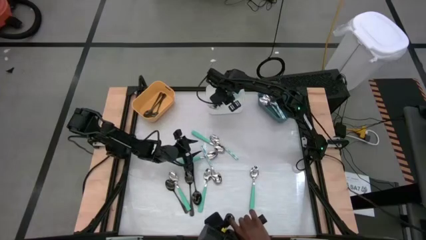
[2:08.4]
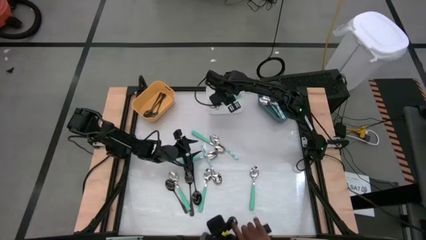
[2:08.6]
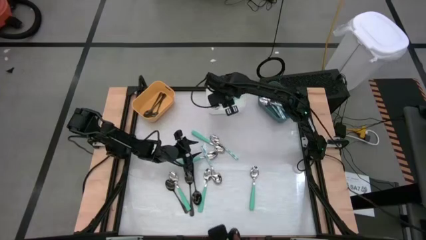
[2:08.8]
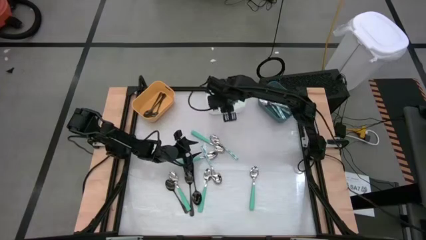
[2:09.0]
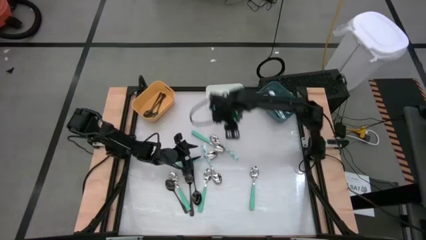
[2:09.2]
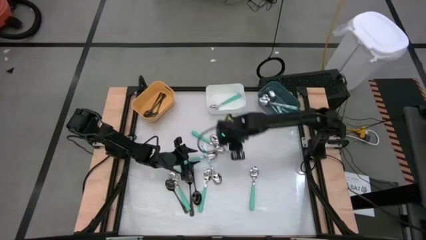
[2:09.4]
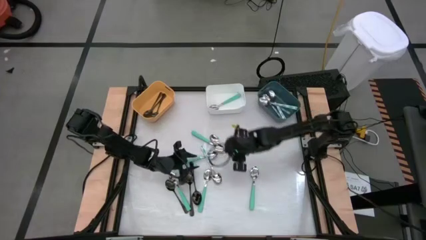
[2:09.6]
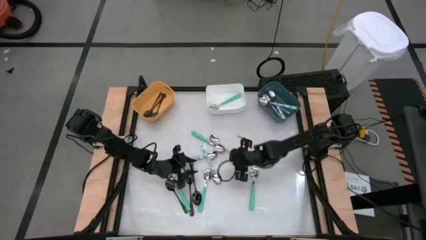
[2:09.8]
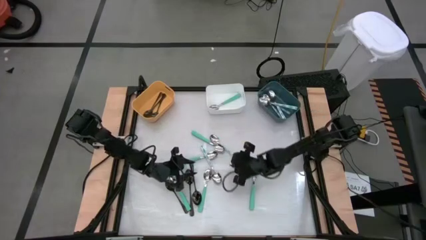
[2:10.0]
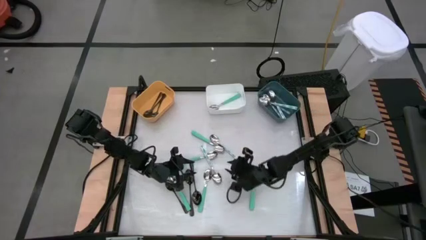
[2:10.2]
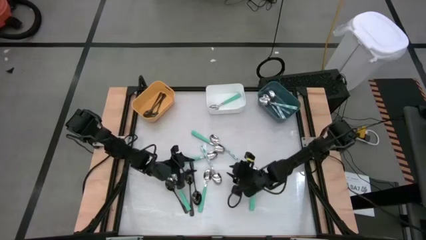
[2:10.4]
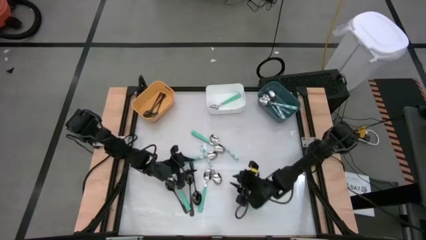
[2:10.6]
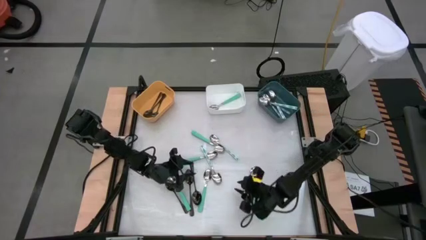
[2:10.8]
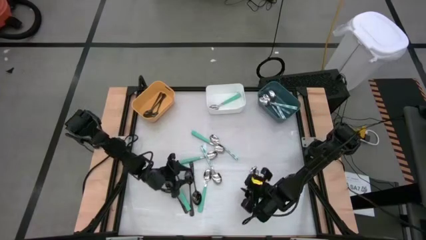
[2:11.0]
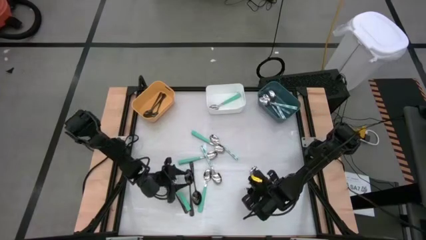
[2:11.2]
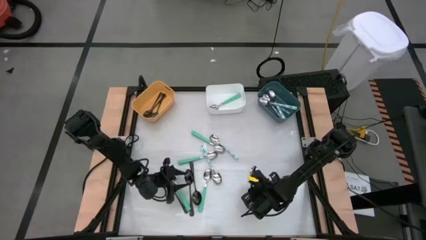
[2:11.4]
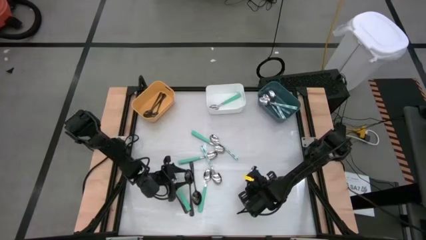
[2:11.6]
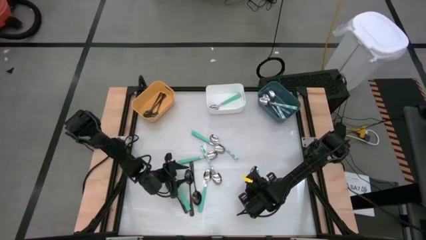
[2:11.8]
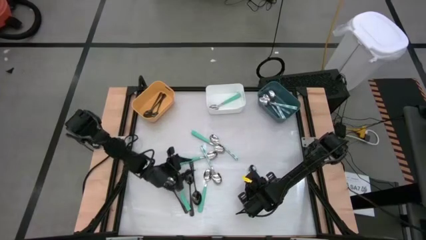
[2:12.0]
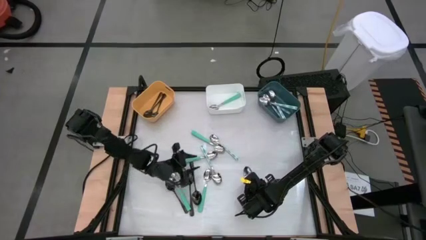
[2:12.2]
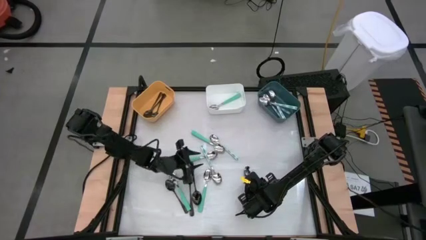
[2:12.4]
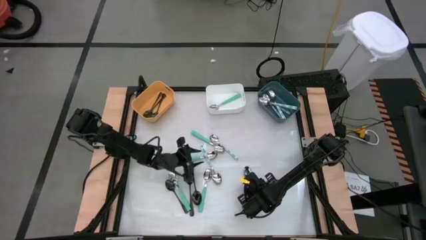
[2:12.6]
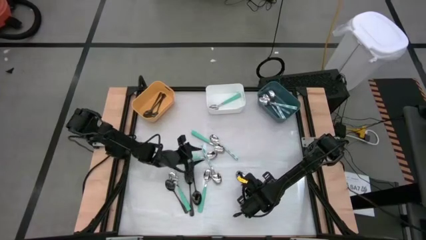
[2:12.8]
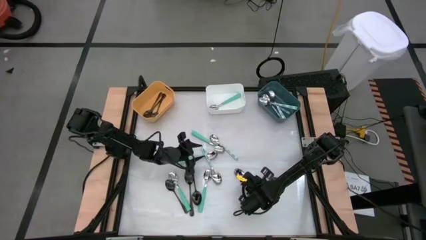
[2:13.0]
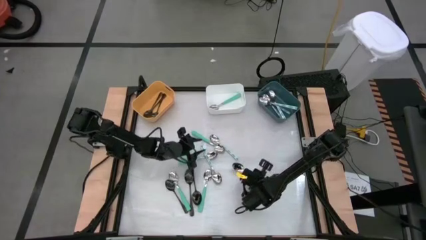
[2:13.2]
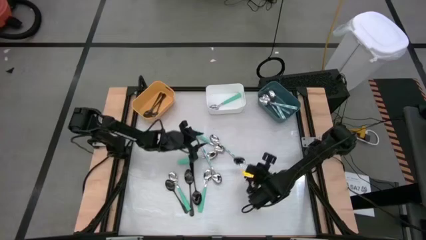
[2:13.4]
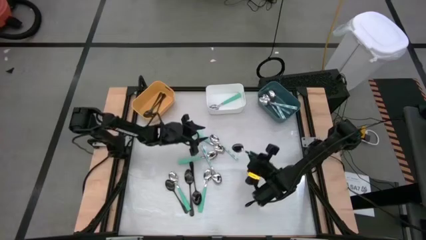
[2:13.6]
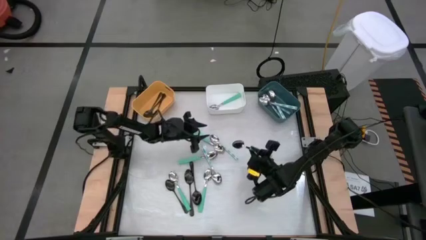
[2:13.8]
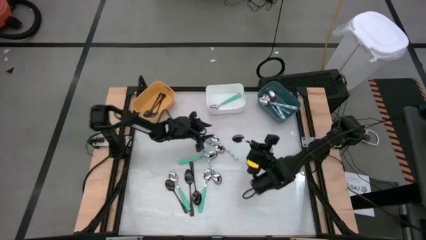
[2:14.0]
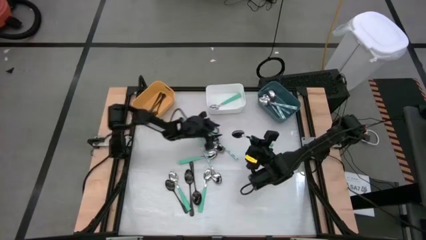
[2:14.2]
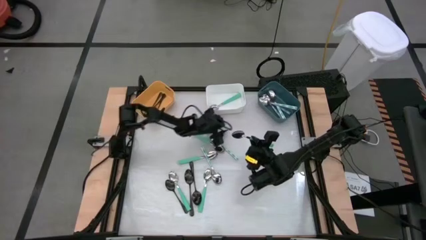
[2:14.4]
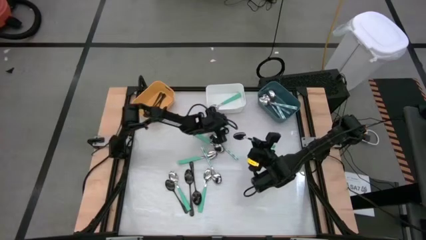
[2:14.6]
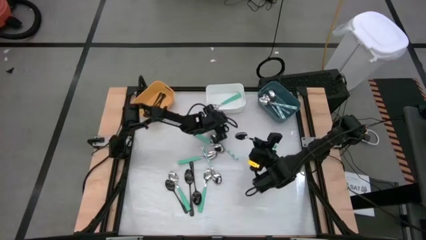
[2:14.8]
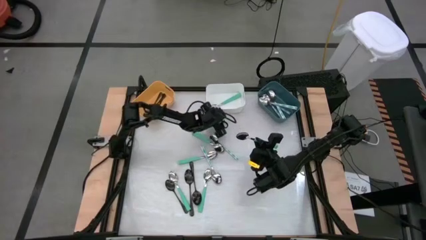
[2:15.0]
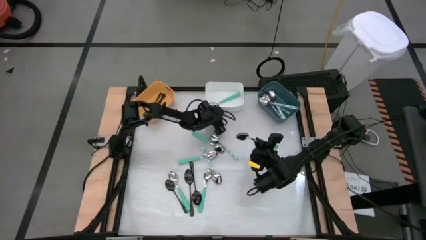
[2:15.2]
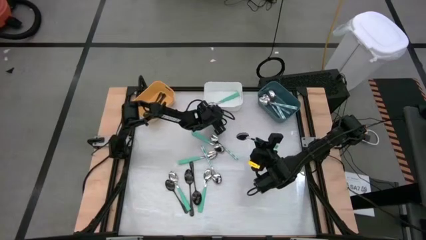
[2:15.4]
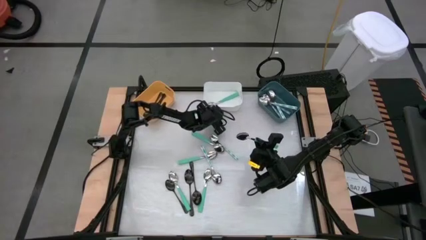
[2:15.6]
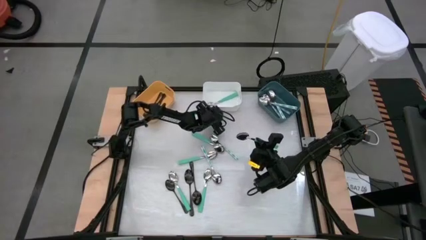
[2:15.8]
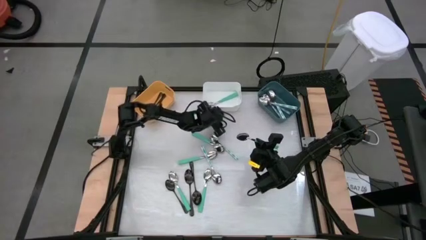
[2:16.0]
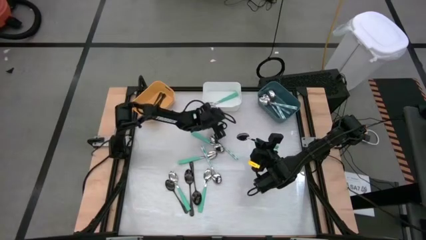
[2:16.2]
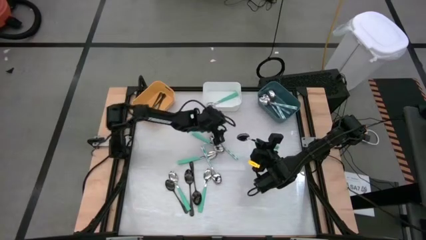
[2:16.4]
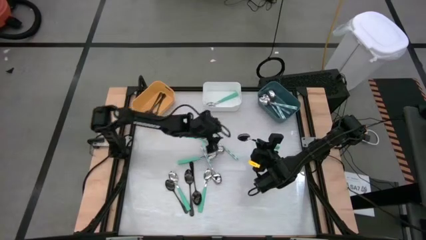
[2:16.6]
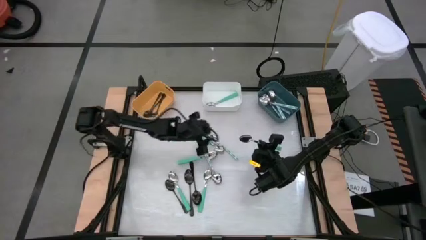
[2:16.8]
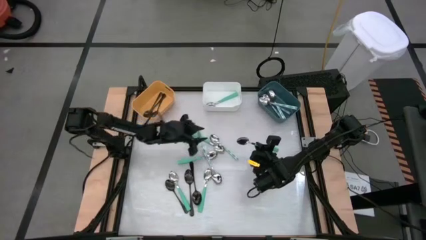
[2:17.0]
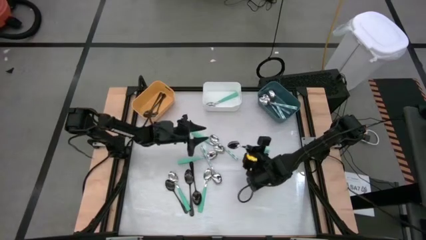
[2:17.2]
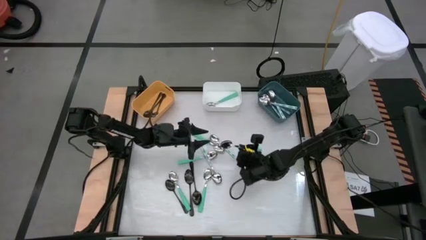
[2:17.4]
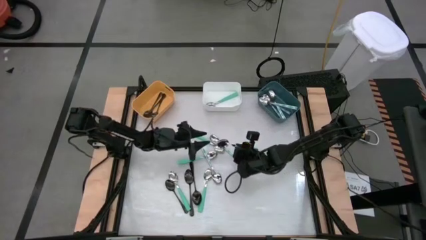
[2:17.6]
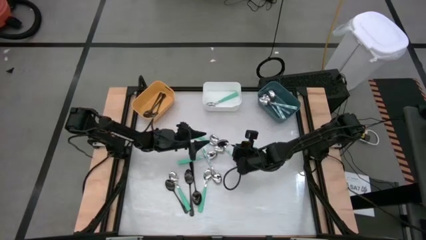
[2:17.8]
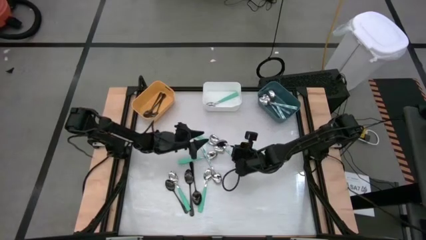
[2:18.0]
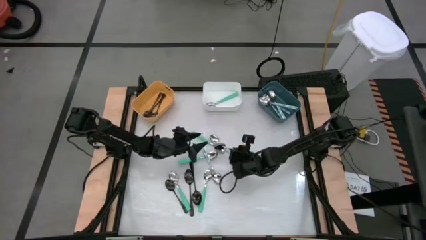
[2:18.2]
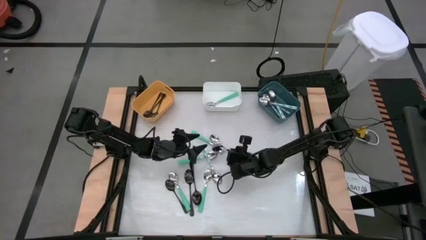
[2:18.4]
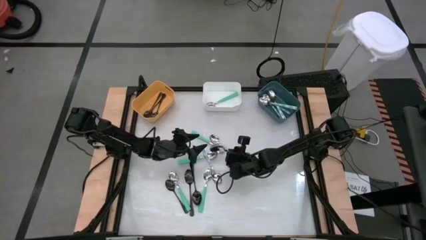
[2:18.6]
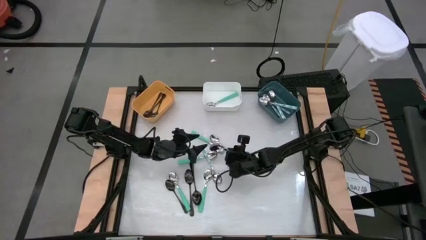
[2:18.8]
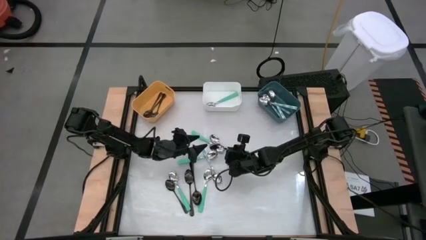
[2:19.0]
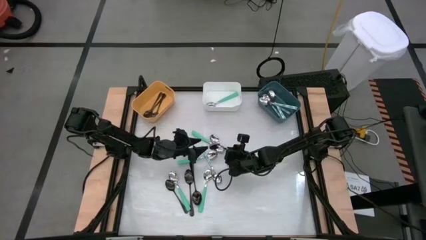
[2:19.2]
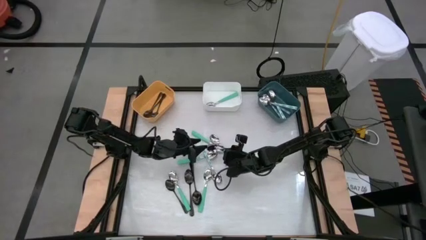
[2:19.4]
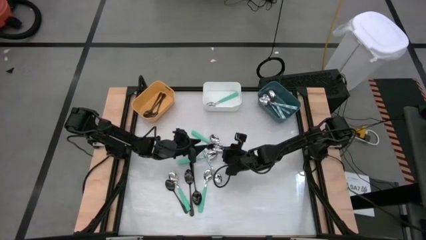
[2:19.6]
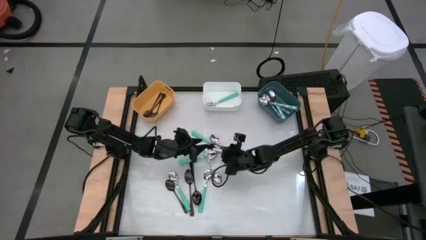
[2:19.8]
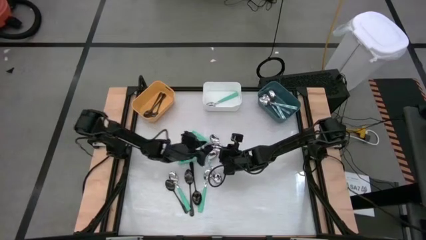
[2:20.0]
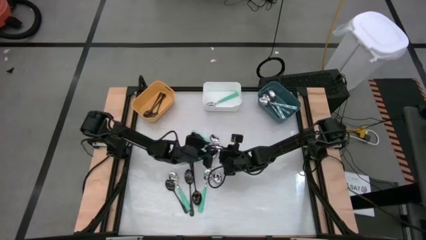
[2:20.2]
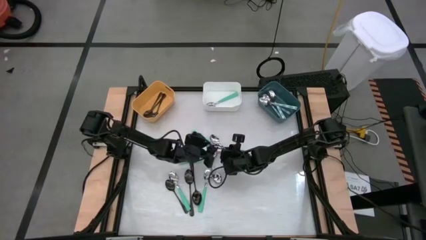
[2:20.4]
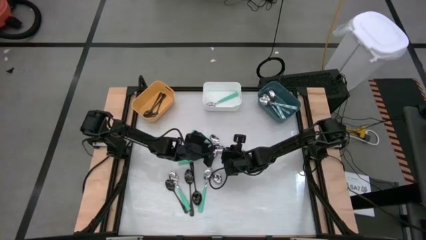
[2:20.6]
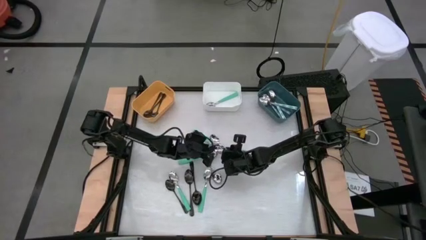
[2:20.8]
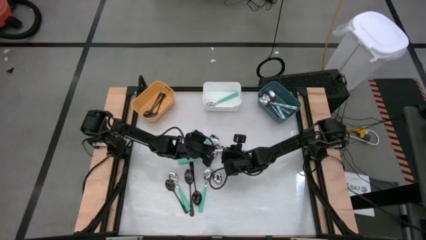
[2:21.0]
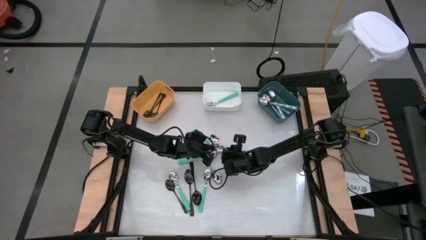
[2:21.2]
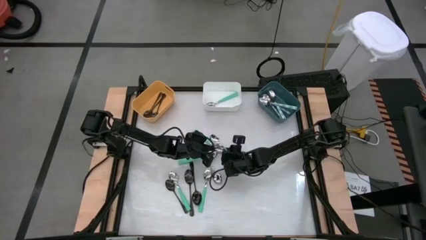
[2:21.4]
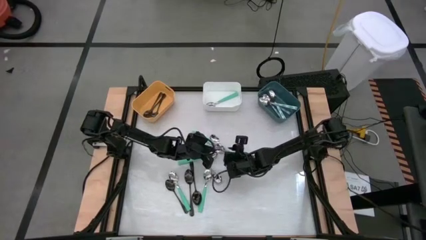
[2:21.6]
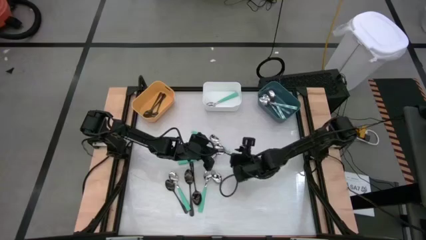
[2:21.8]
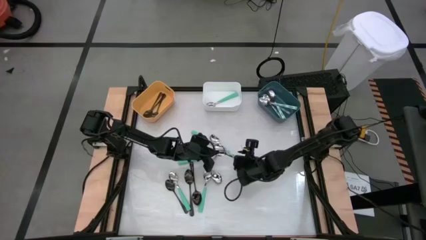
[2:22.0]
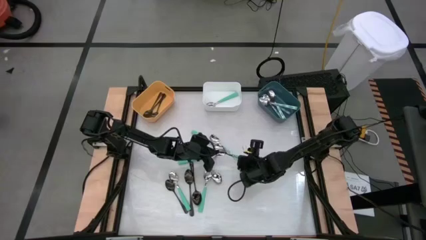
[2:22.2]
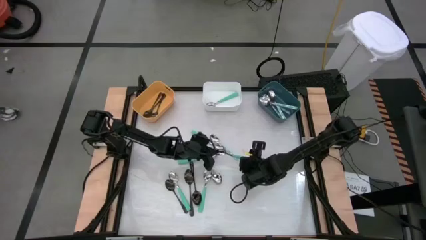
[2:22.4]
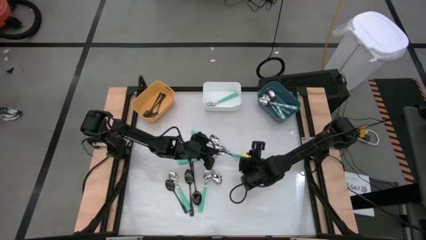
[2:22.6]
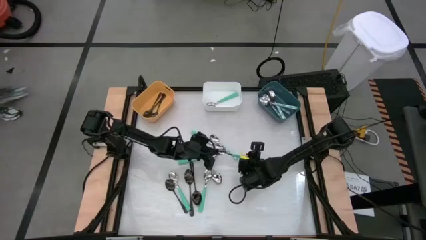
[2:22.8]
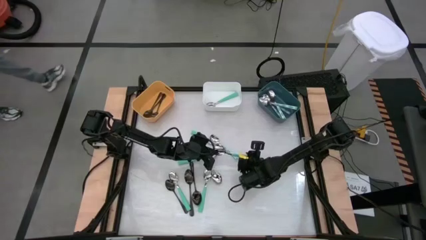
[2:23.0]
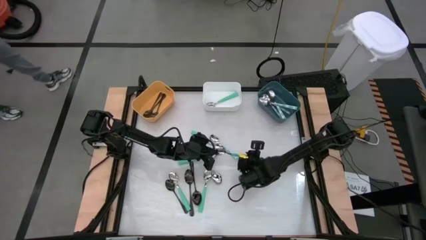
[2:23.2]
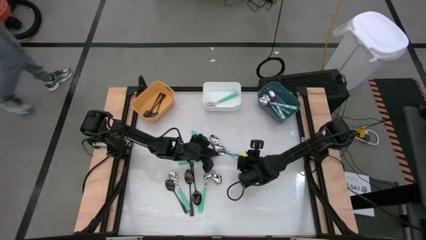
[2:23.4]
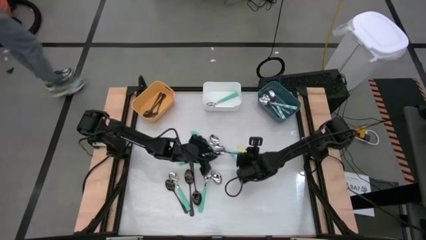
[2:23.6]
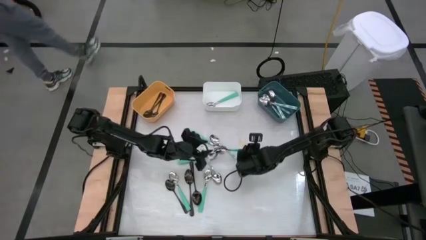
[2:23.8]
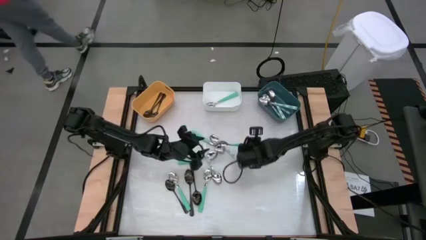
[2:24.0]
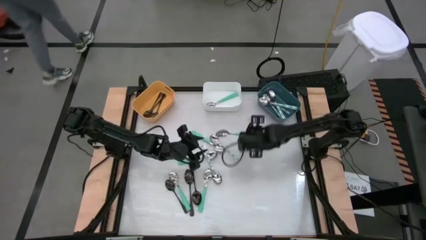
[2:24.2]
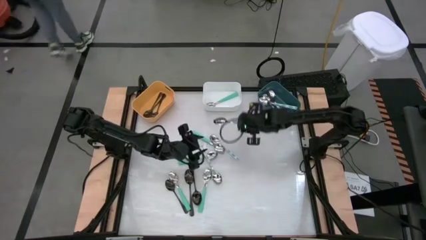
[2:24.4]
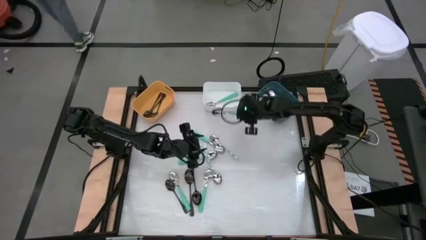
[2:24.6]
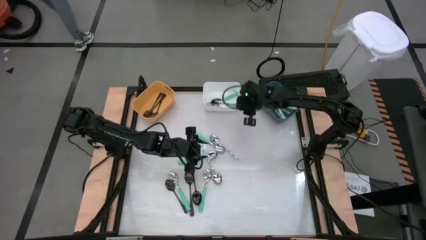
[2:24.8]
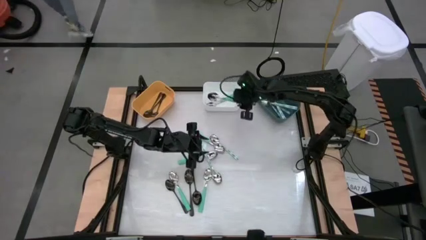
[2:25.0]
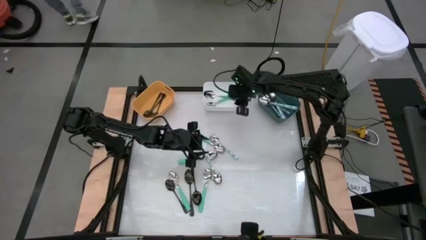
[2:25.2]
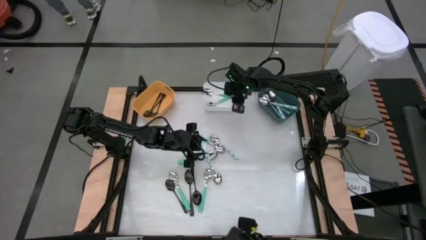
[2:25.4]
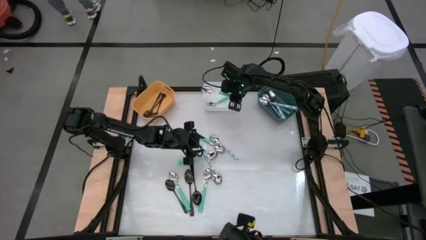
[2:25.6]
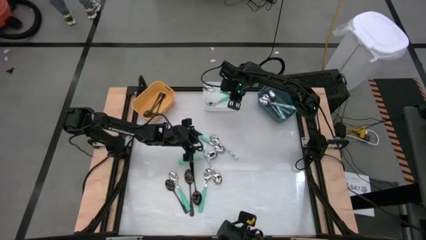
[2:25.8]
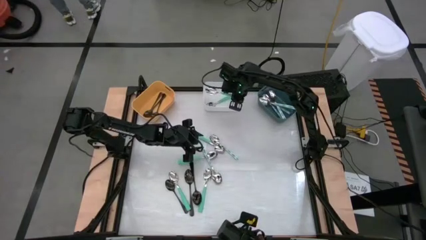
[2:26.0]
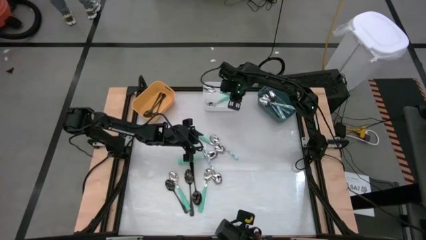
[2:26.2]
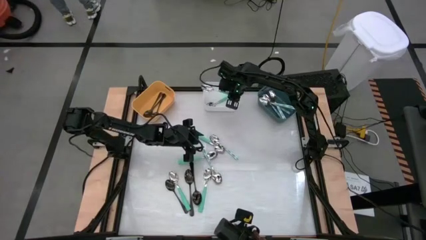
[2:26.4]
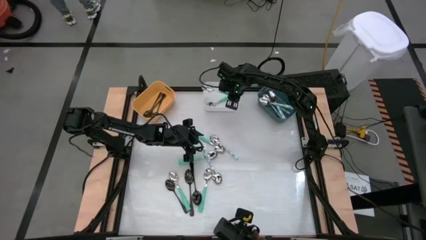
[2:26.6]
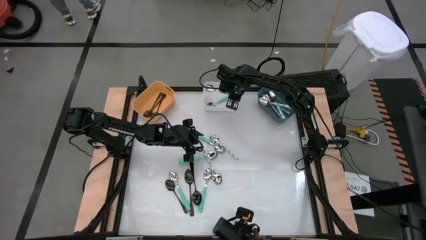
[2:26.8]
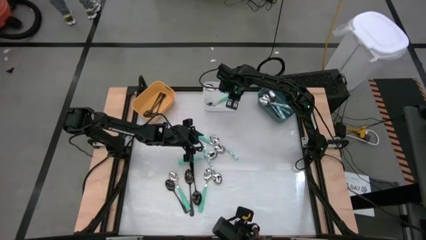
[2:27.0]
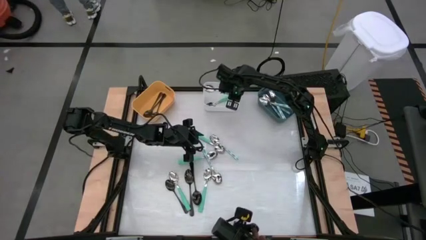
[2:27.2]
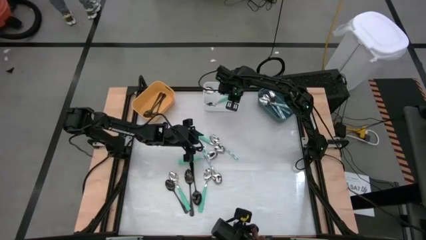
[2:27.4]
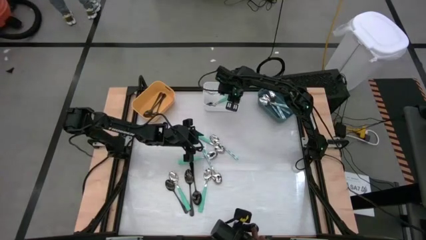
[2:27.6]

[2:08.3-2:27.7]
Task: Sort silverware by color (type)
Put the blue spoon into the white bin
